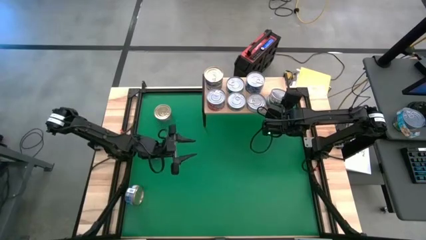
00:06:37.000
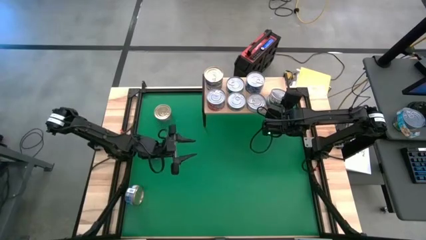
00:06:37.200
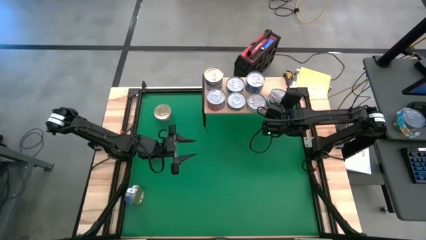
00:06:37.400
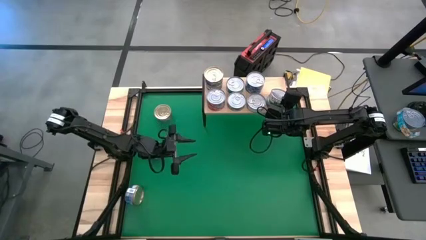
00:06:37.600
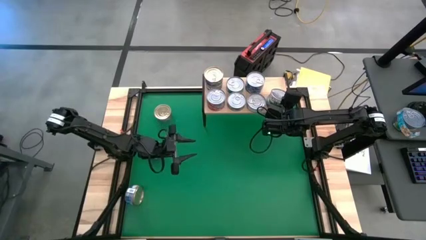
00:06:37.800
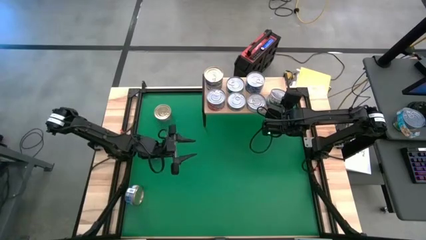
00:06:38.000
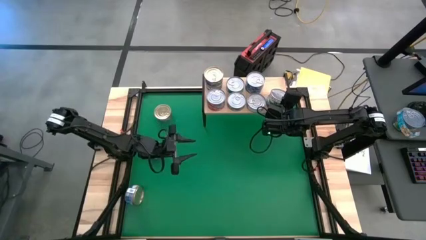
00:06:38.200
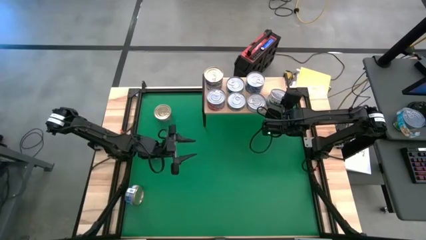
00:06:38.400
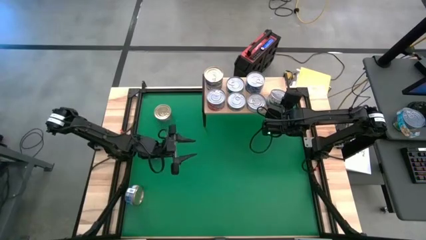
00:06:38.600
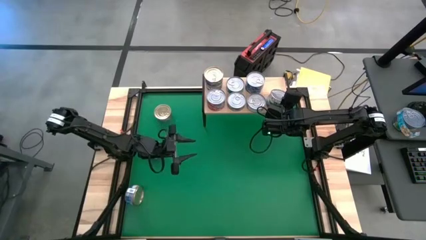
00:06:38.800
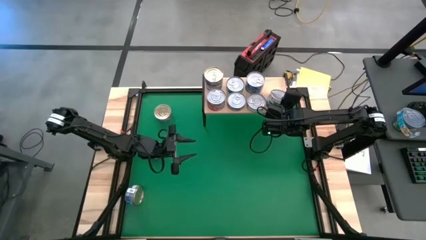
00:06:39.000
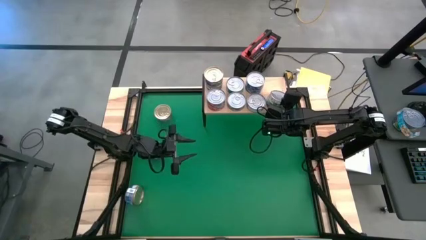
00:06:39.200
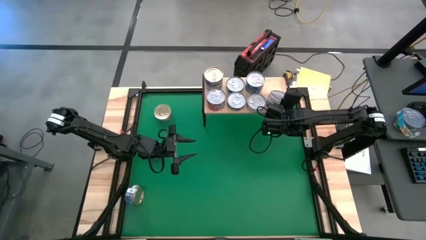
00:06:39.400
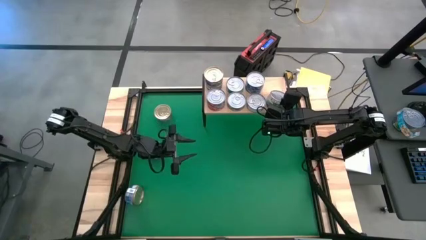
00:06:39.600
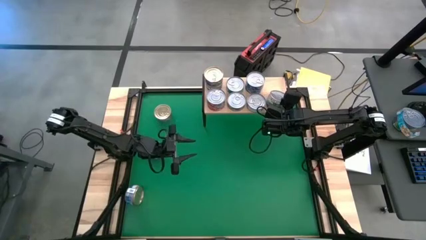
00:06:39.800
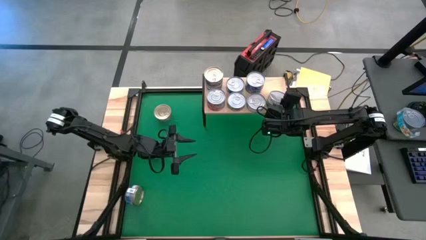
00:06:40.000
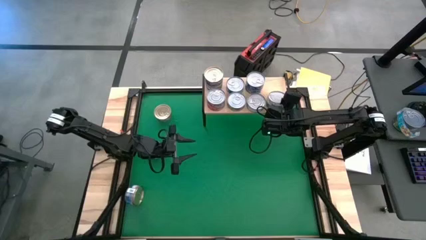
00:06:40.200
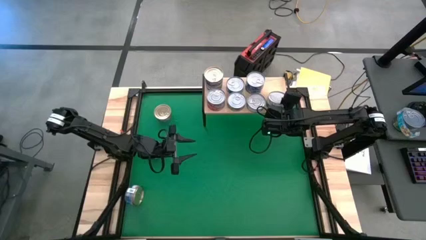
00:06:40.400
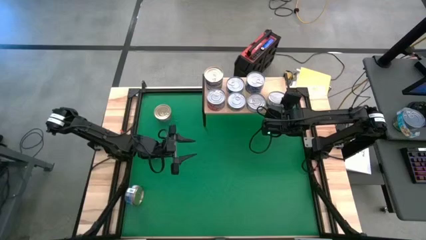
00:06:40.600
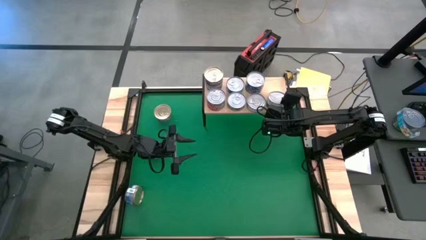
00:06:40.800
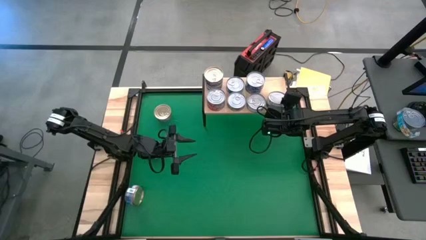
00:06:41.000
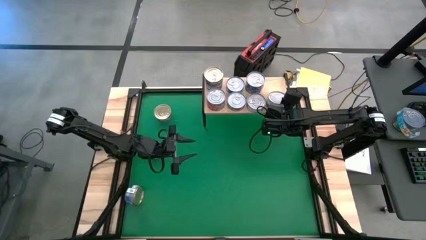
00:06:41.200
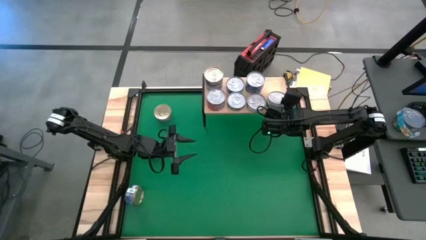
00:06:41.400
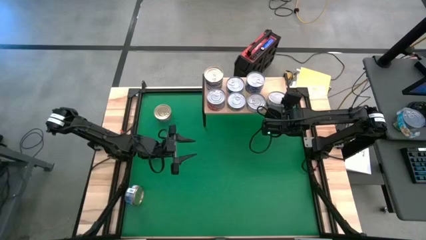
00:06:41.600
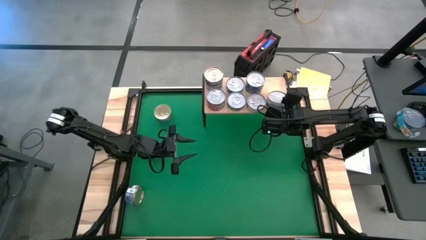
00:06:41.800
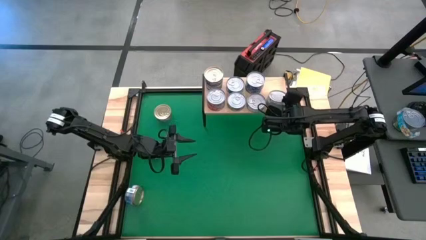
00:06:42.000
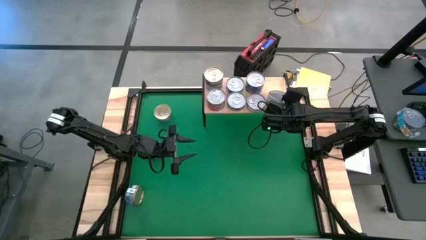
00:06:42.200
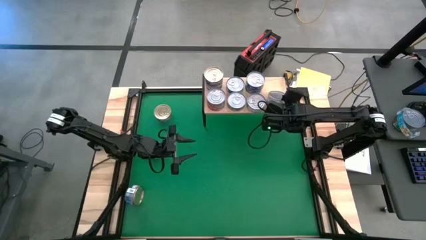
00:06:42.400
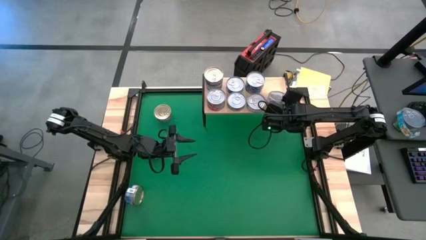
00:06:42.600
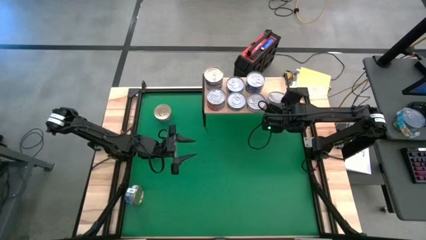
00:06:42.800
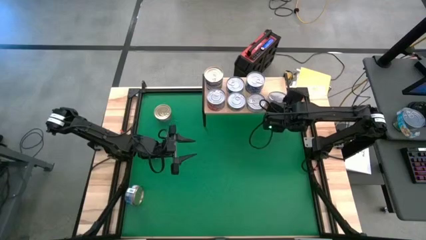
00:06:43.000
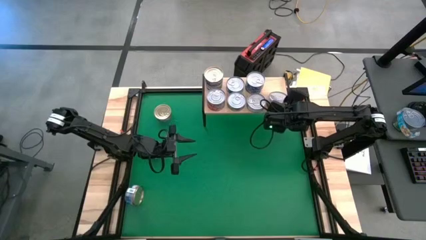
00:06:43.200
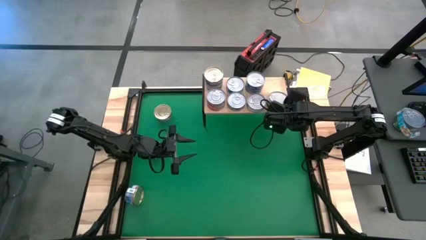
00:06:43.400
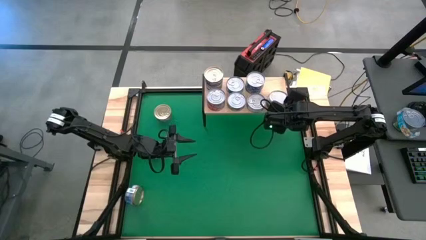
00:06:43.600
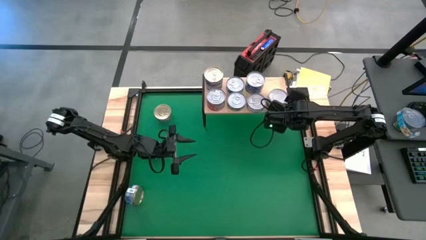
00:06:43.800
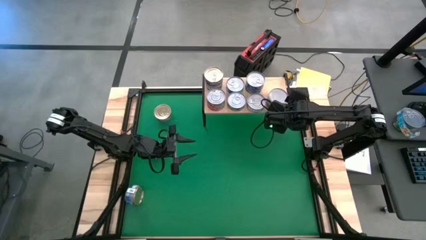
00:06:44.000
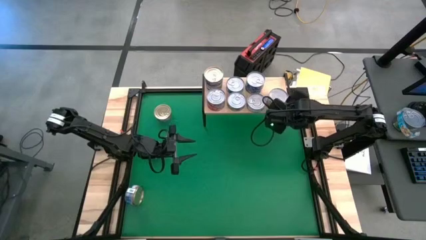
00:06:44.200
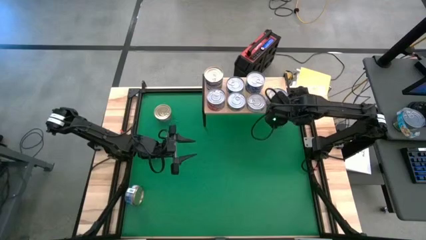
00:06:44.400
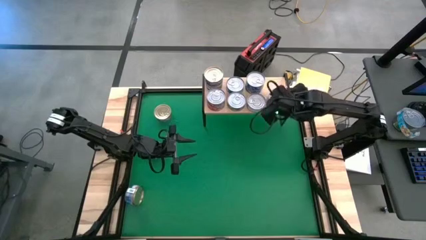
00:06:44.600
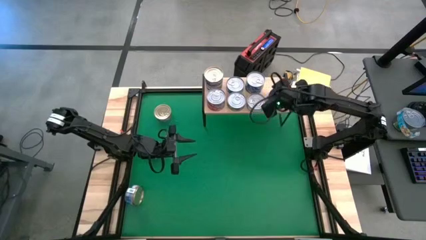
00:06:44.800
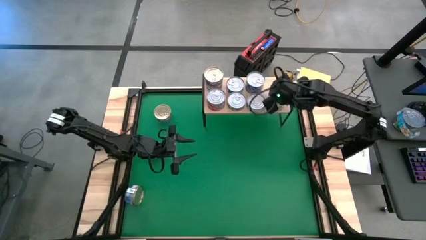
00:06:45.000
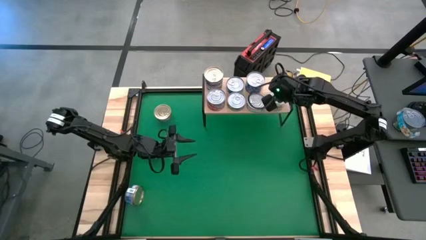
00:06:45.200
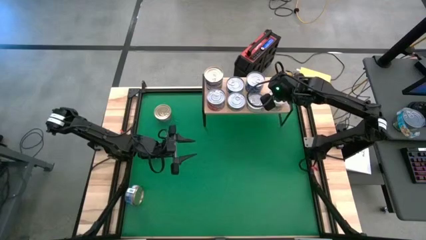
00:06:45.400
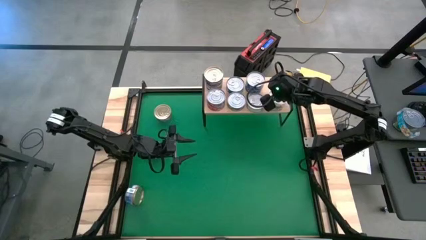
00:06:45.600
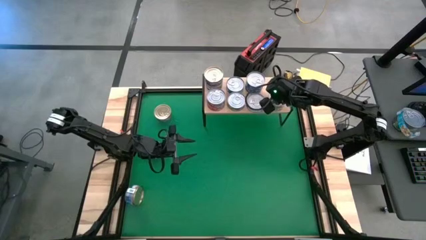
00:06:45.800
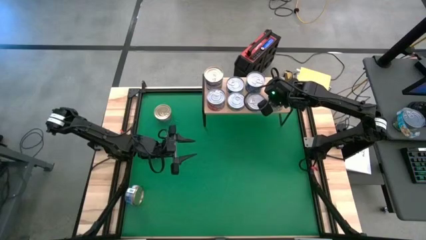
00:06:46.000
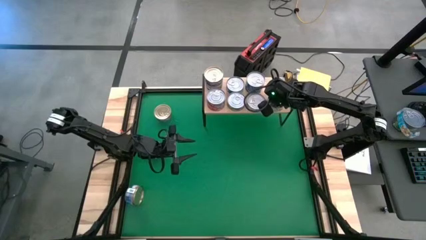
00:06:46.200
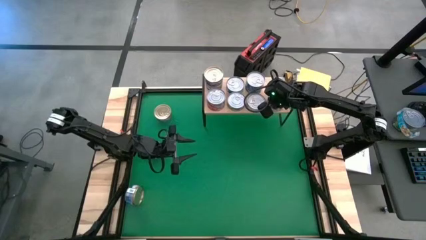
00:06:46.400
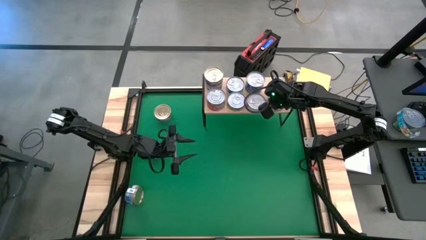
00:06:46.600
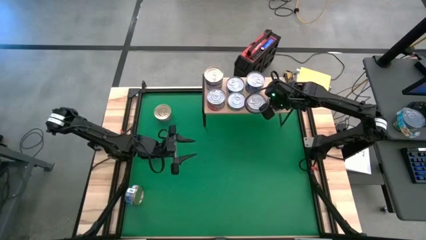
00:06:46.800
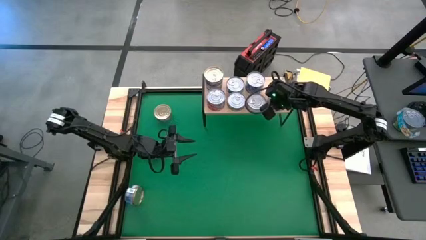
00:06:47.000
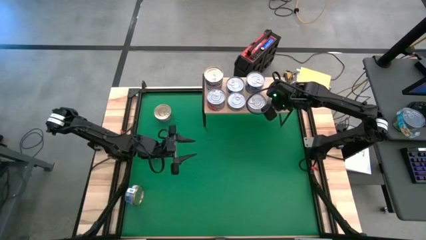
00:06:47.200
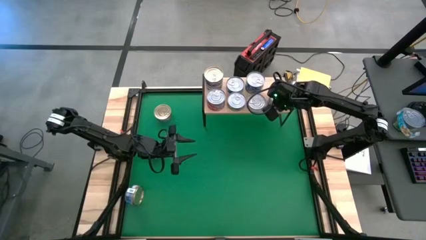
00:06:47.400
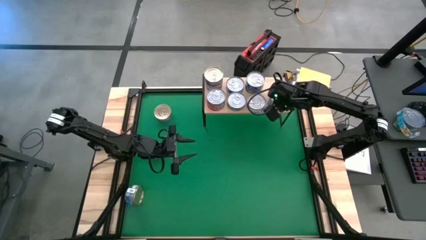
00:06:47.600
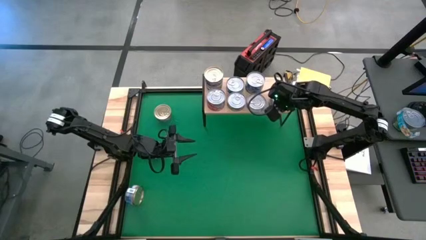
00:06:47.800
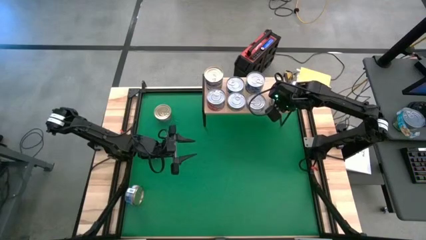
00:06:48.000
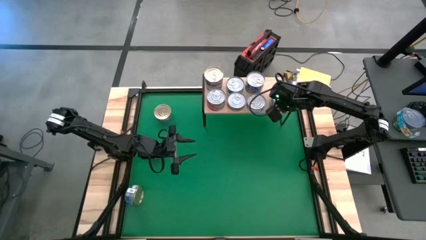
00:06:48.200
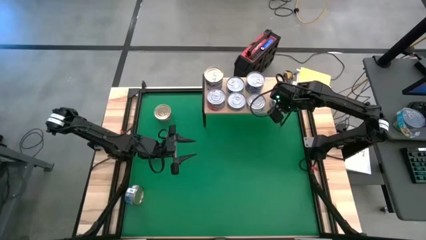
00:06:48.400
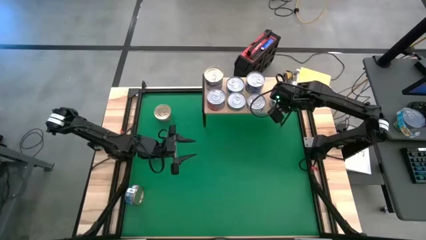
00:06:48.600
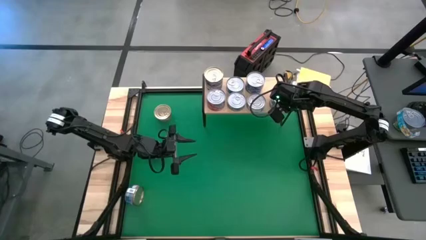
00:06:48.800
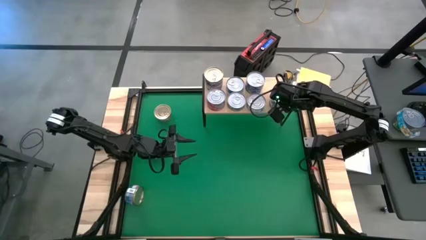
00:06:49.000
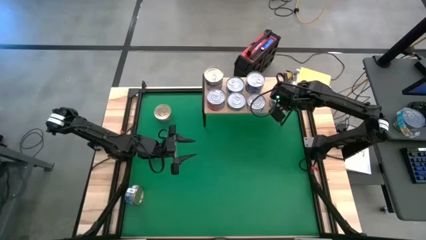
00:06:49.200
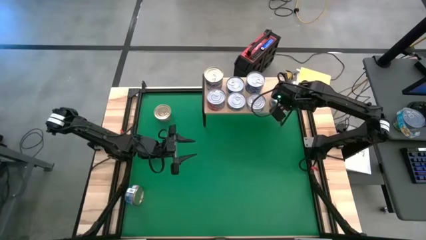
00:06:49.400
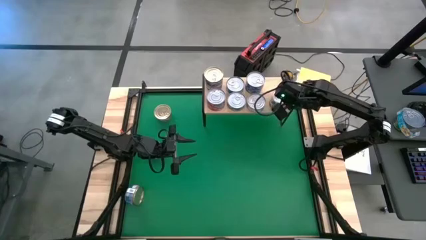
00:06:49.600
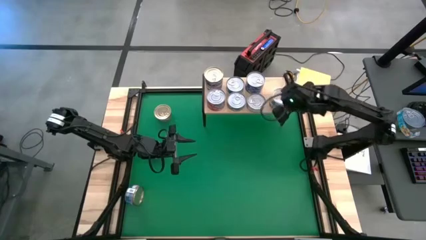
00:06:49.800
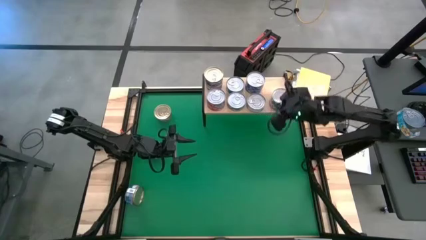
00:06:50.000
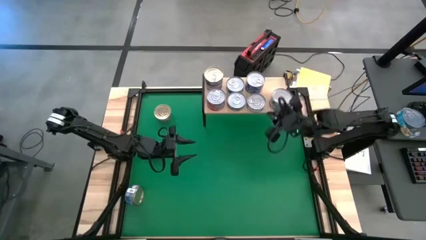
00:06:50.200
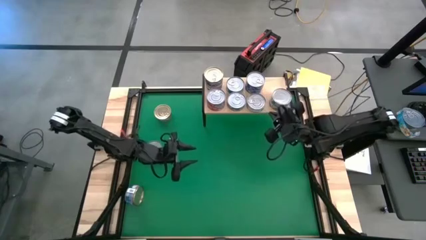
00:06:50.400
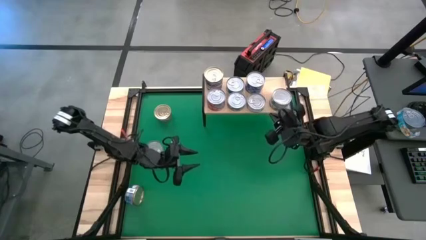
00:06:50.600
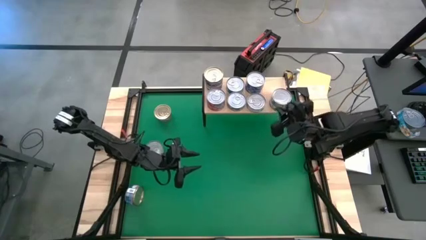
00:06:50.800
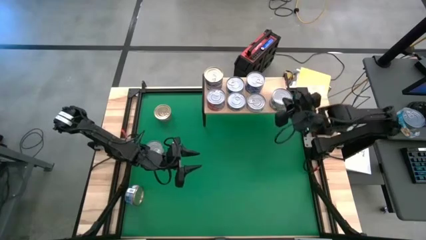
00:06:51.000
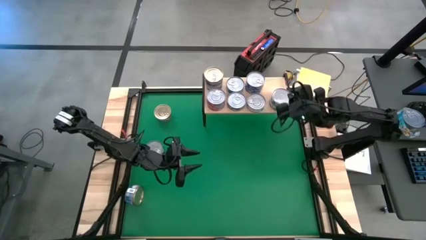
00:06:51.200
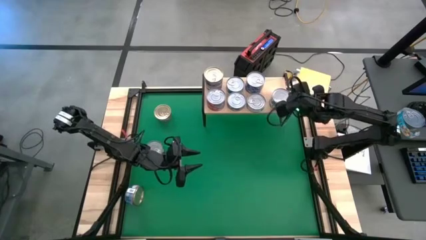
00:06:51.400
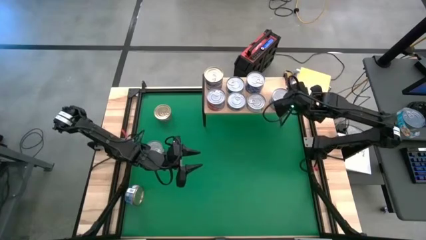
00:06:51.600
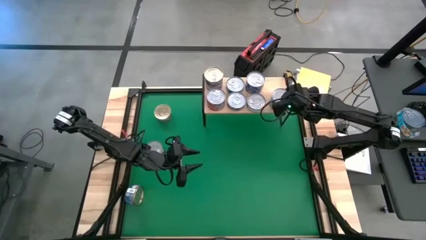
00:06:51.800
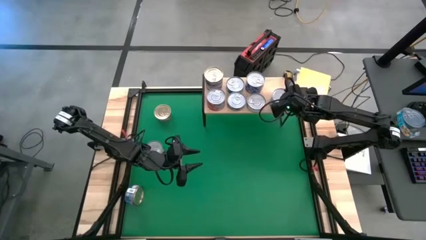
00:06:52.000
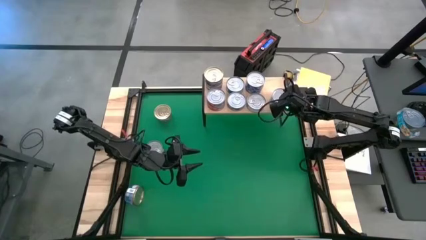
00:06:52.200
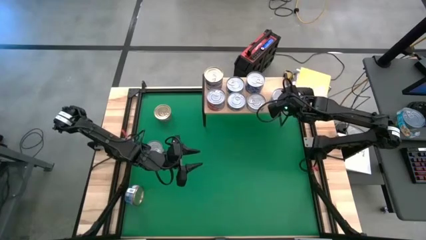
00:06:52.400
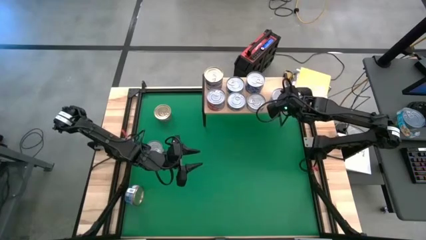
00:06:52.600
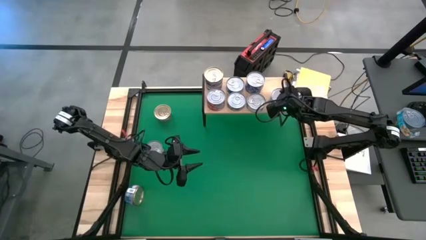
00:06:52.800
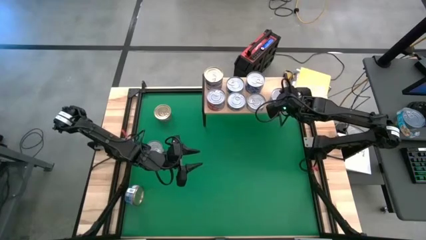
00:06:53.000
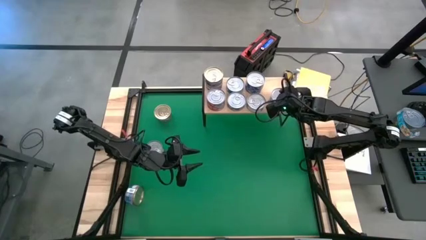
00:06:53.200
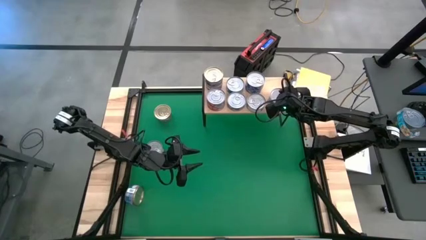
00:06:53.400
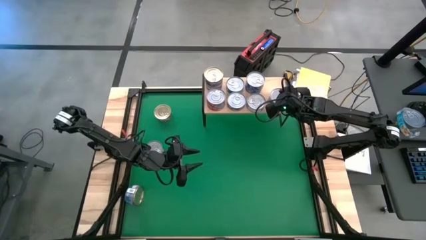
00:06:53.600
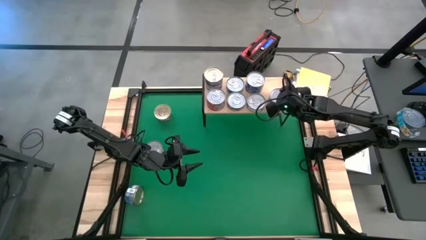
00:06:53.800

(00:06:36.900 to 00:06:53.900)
Task: Stack canned seafood by type on shelf
Stack the green tuna can on top of the other green tuna can on the shelf
